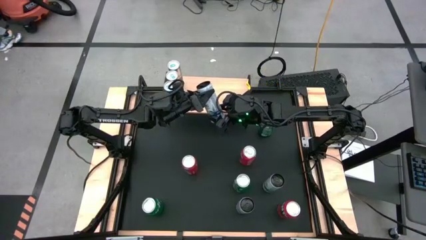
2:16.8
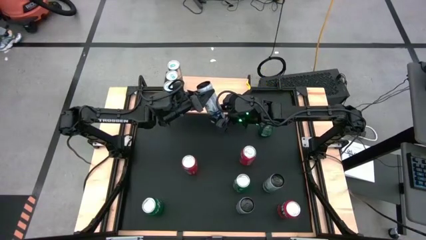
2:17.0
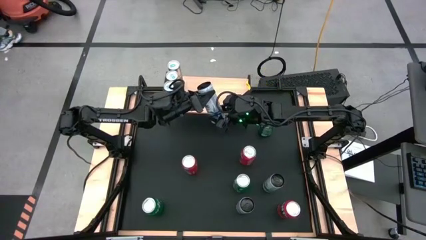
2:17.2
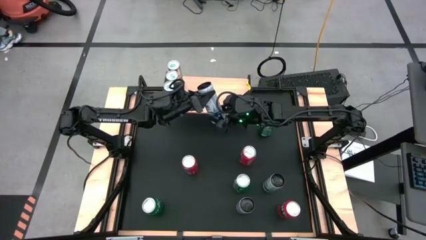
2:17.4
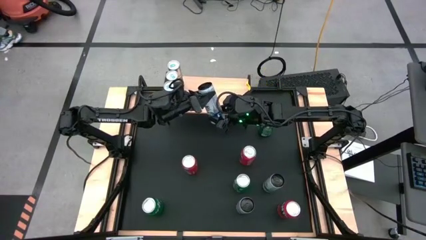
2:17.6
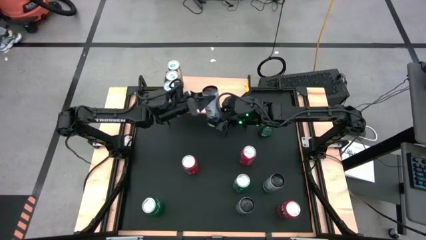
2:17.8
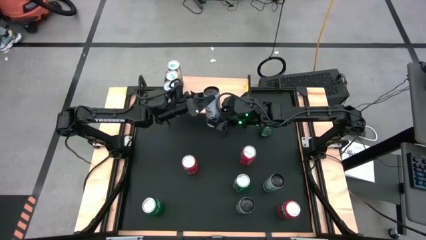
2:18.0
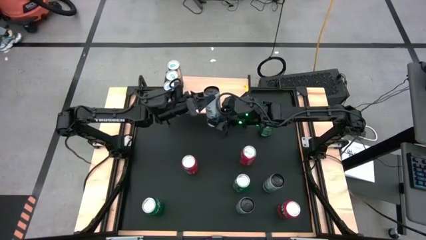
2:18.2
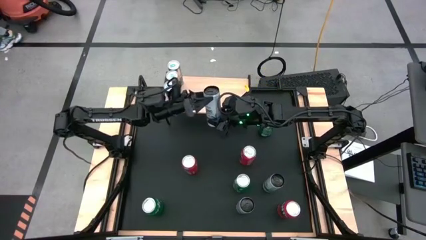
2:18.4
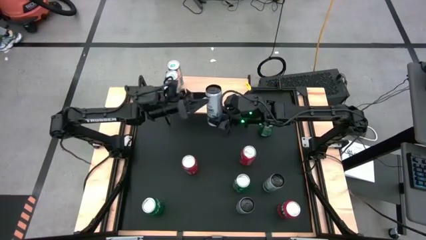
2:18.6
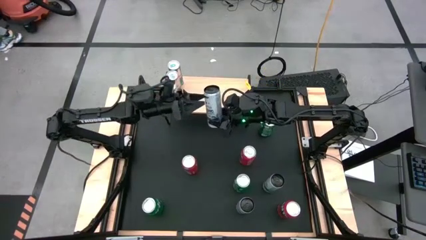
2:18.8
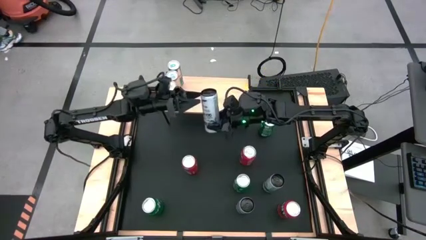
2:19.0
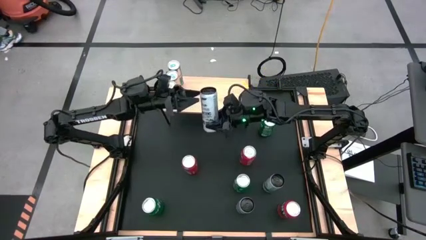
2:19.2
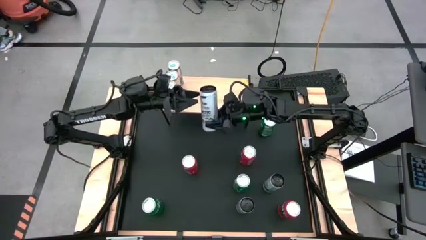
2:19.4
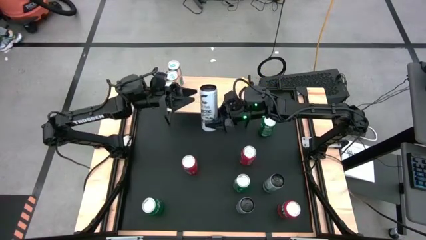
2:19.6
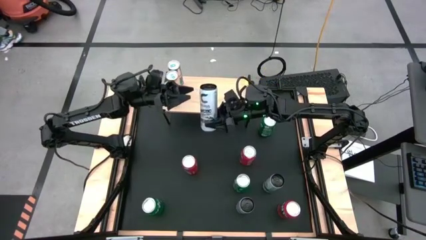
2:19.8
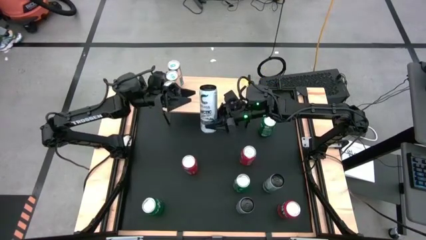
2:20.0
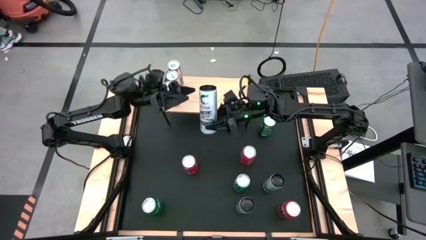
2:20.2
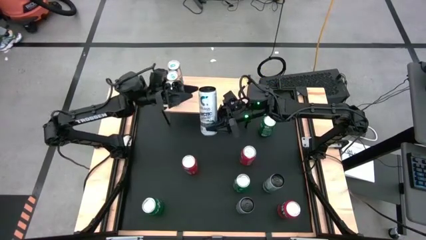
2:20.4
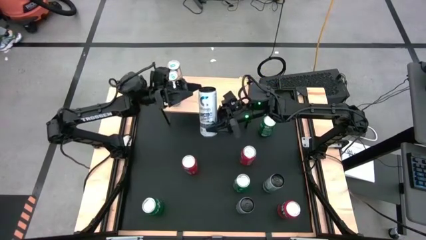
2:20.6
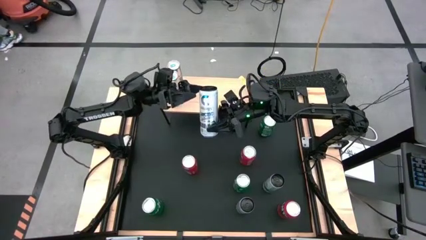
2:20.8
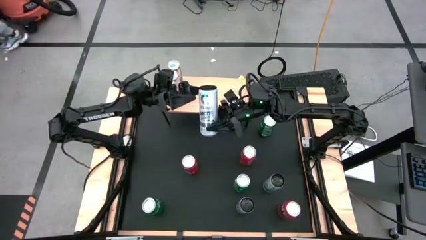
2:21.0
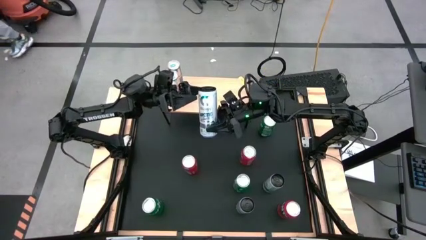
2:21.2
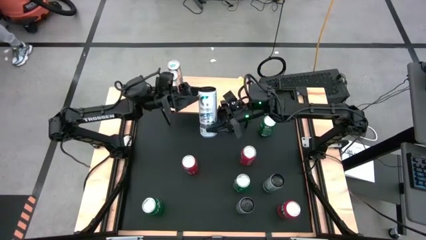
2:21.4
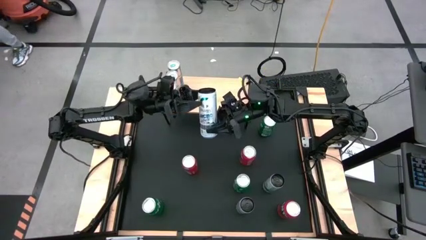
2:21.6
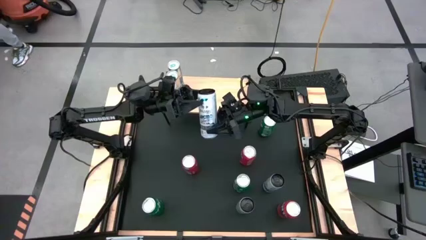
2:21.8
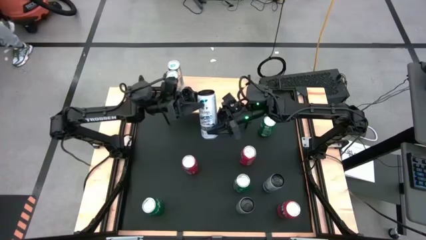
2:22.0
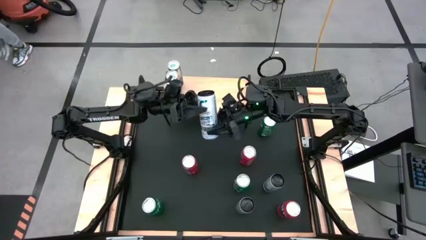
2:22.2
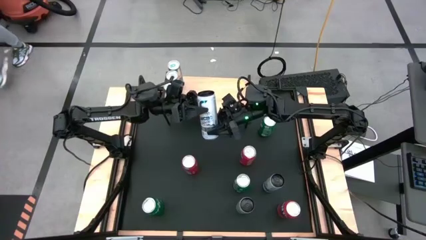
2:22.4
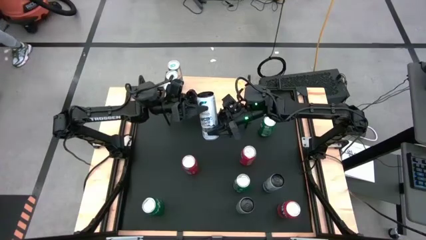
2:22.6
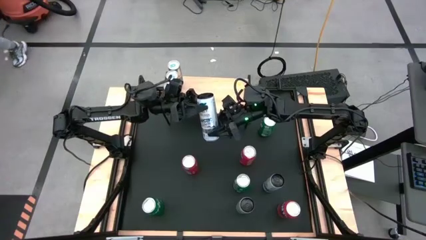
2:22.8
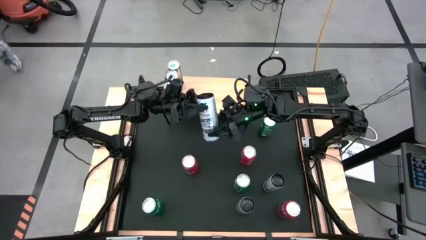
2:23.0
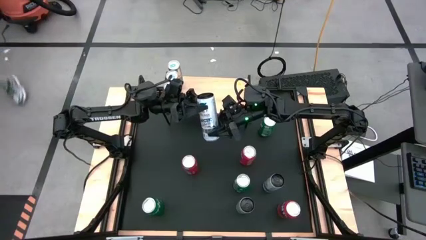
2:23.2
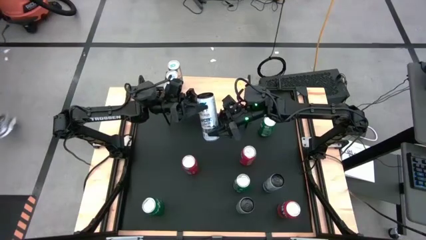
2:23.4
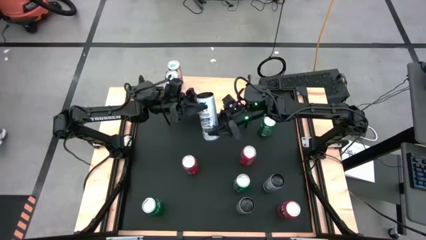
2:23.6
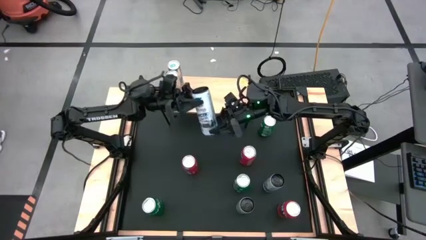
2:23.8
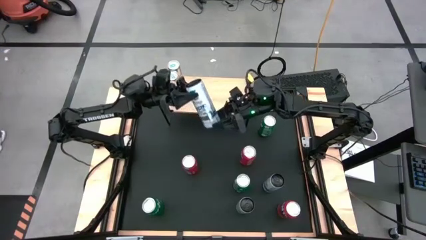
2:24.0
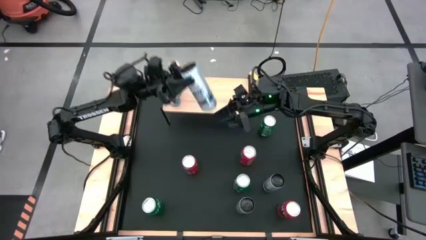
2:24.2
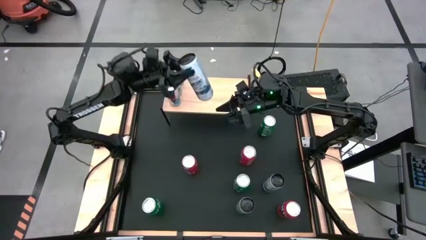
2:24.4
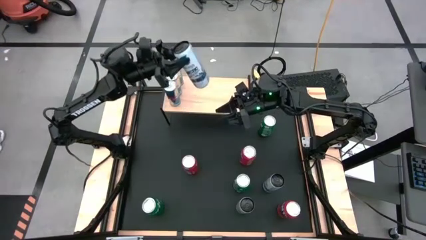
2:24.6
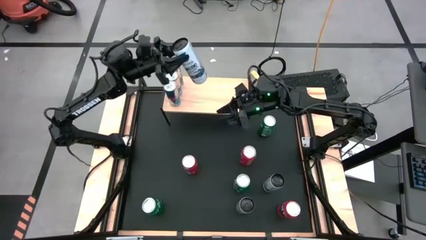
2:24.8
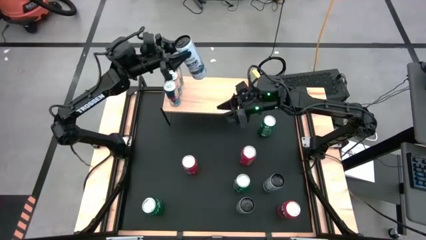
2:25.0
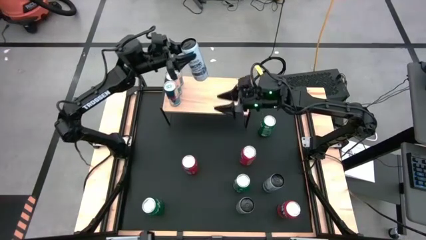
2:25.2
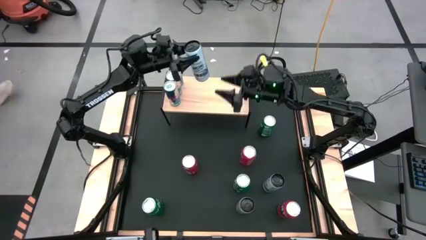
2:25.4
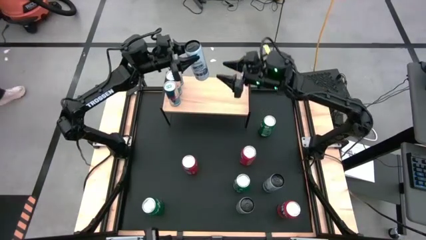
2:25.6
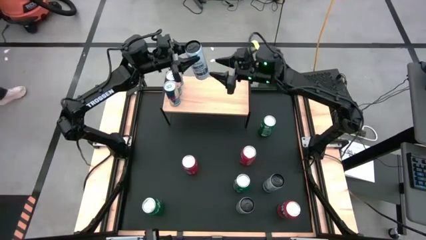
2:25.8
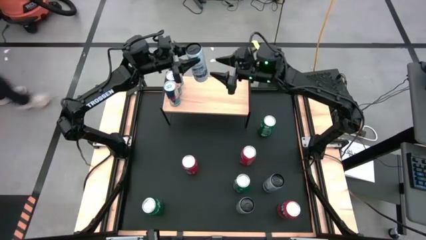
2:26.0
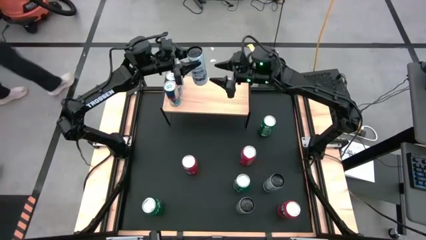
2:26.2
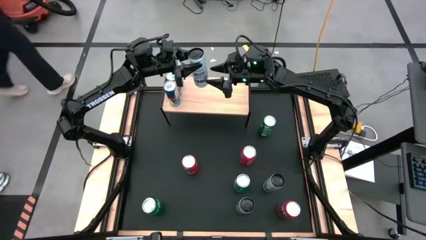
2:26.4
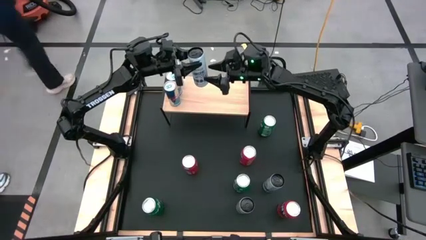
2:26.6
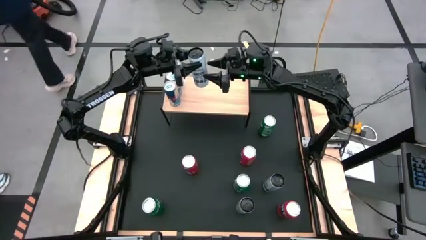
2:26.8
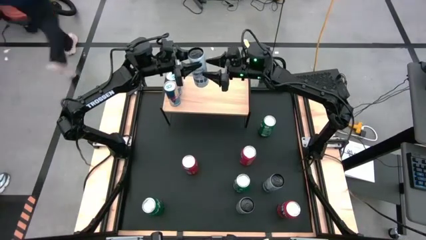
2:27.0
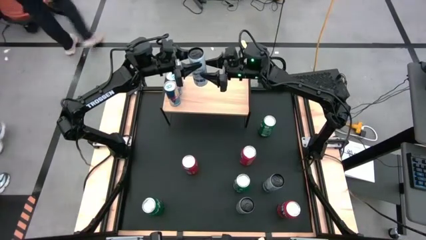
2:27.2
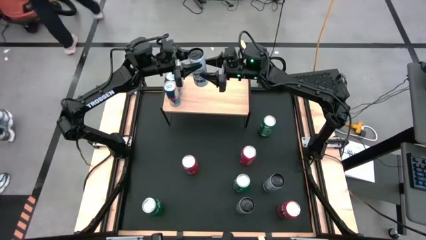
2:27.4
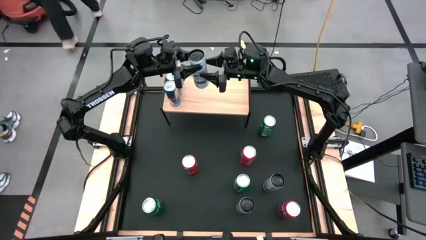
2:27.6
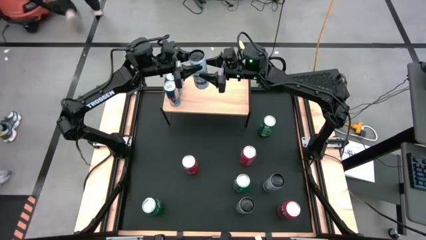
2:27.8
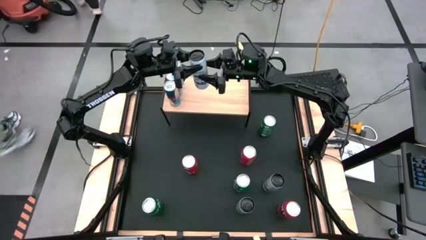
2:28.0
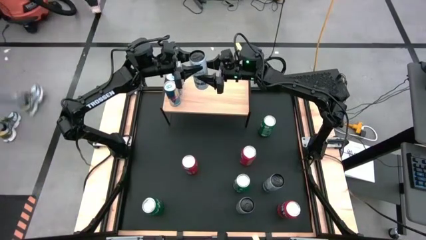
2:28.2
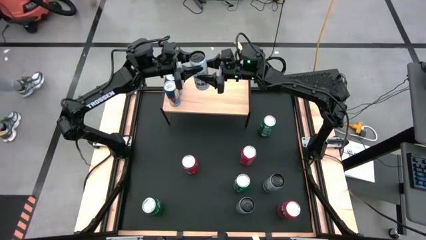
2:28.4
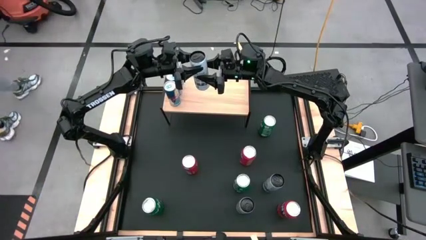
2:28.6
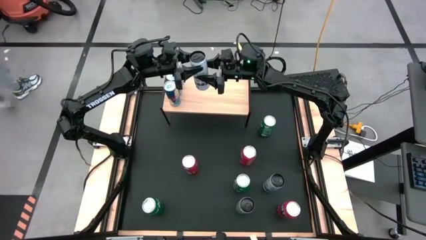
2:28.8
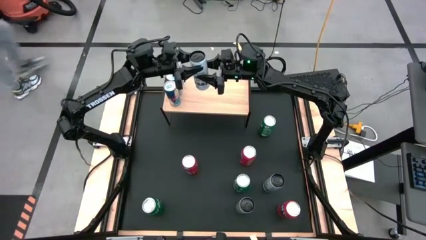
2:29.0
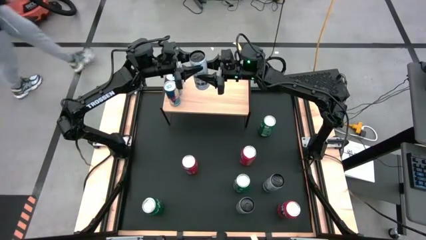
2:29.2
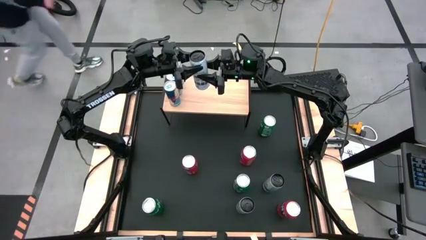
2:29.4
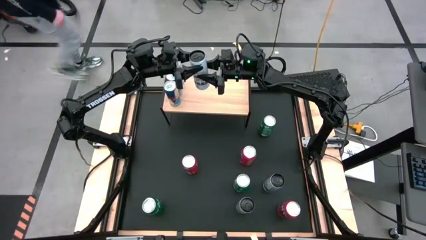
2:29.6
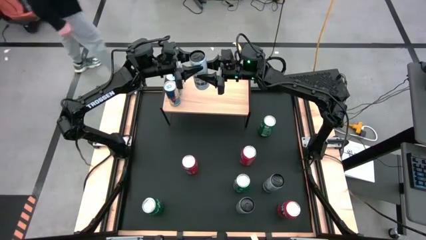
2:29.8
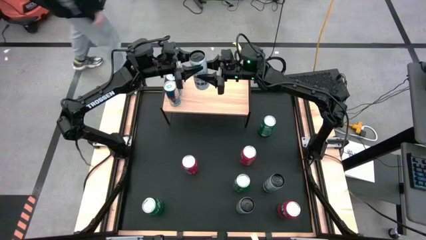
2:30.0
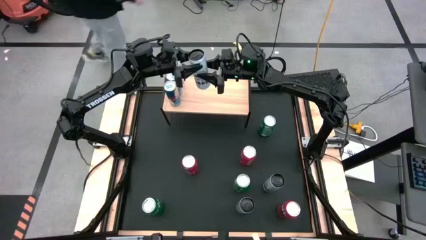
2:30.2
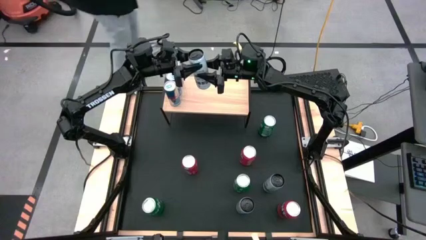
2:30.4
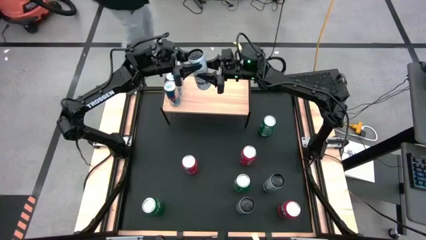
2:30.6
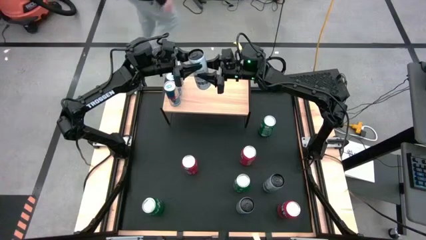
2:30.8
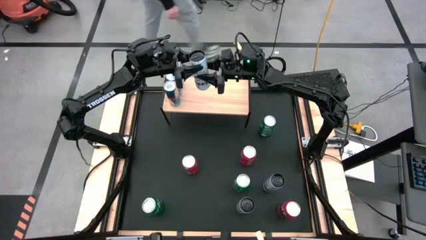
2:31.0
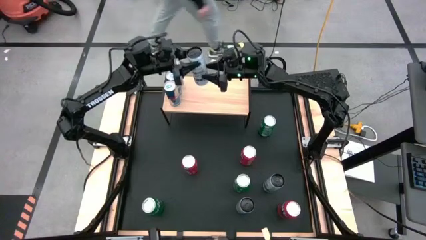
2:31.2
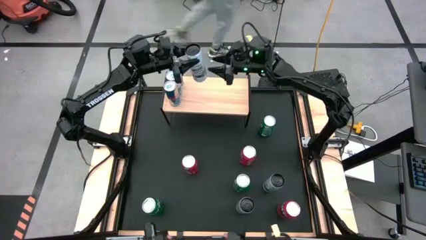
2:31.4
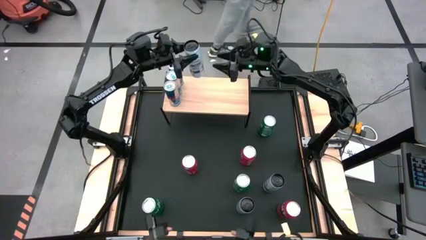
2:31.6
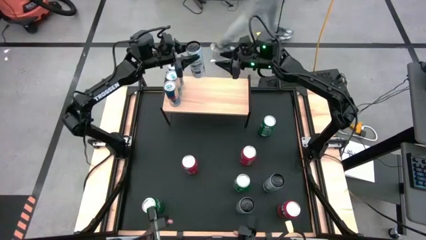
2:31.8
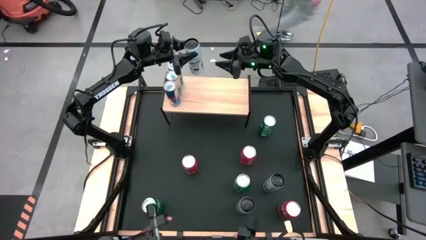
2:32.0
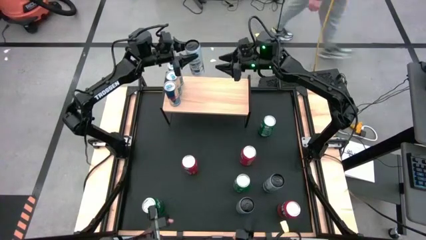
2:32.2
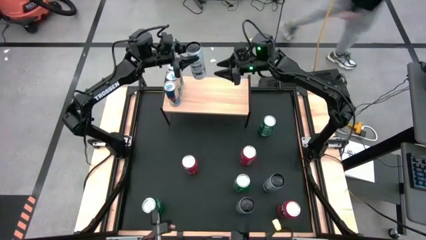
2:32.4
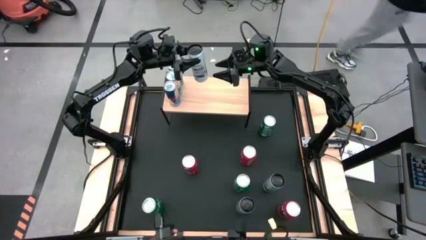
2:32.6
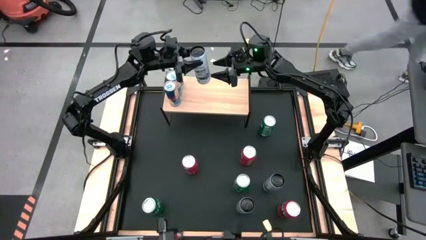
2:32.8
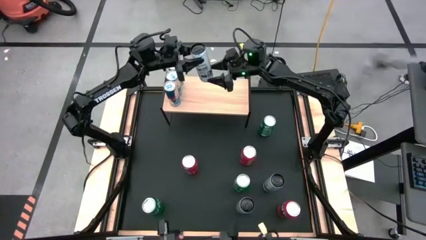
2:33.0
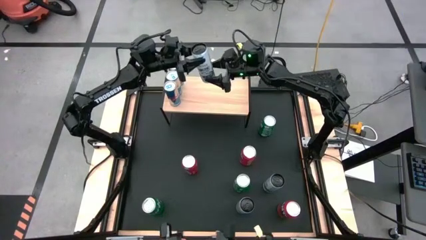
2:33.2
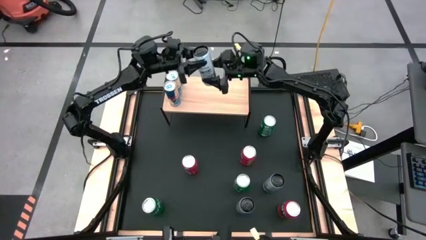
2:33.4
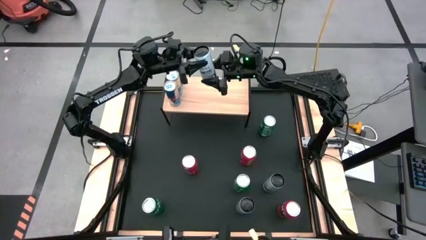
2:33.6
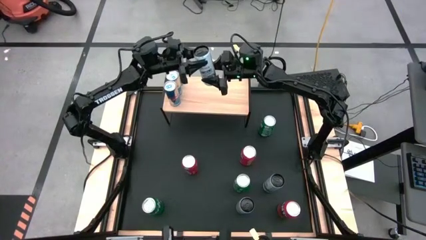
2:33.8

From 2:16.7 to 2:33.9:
Task: Place canned beverage on shelf
Put the top white-blue soda can on the shelf
